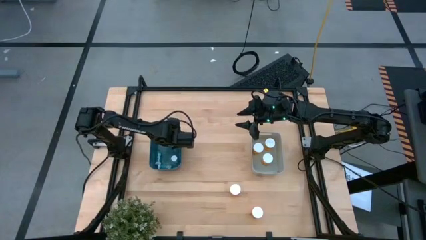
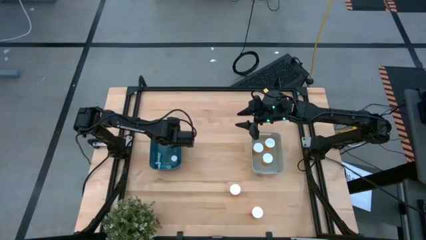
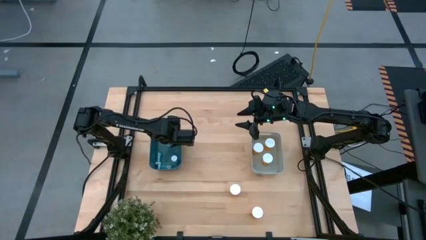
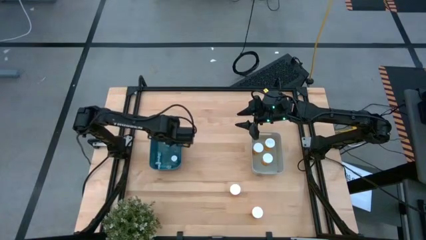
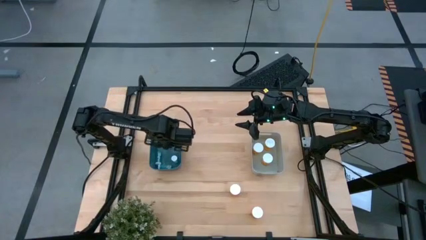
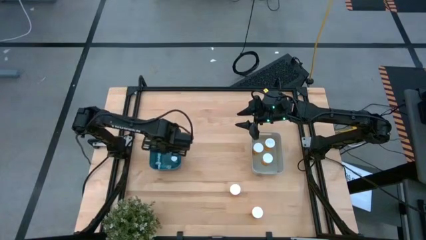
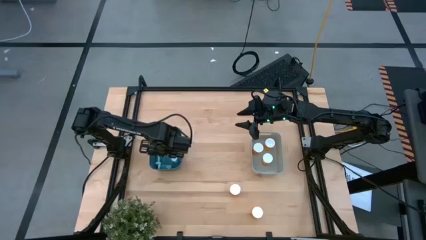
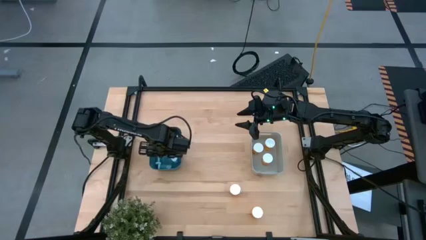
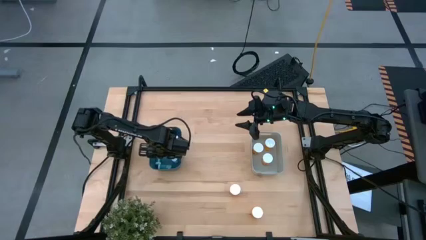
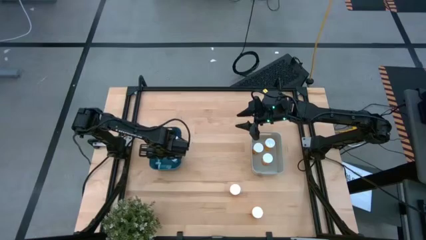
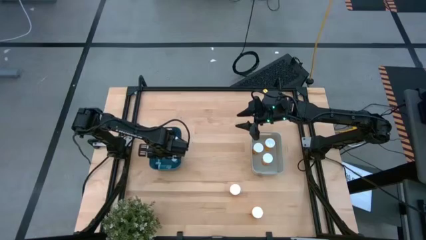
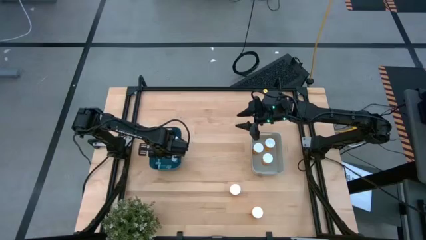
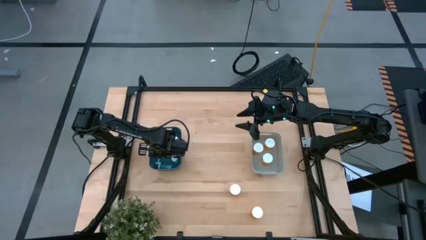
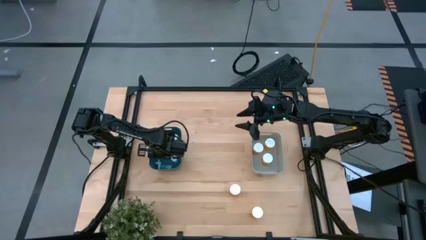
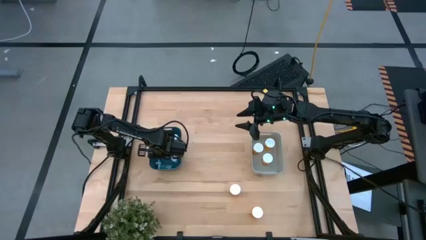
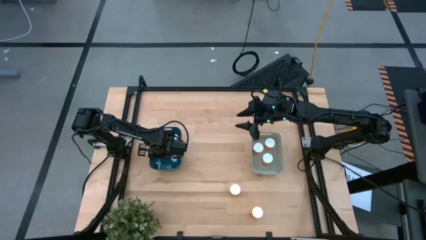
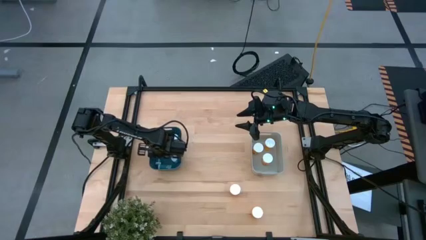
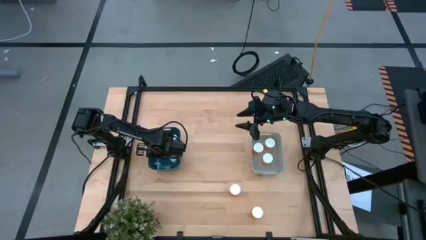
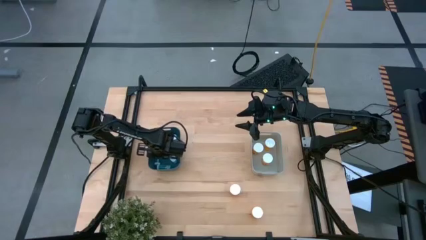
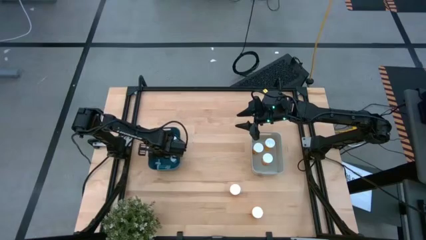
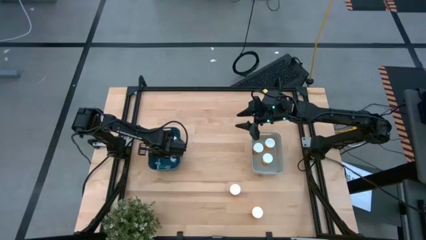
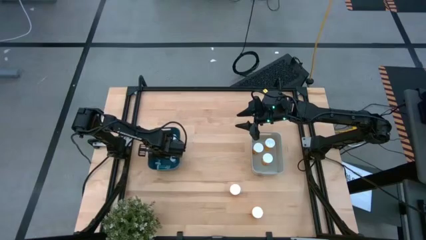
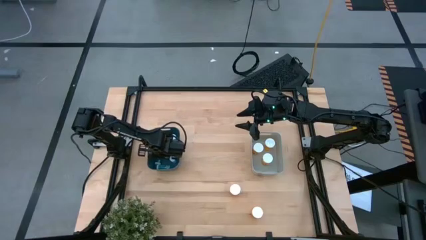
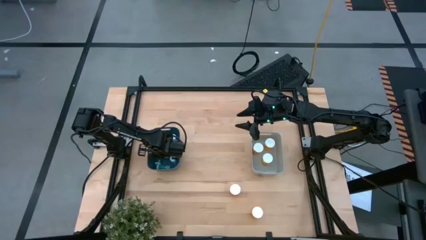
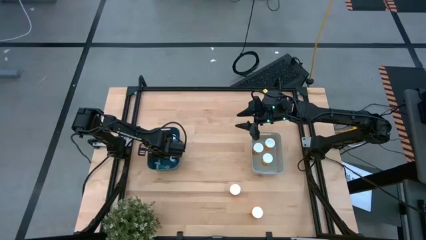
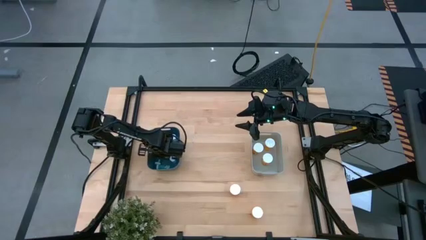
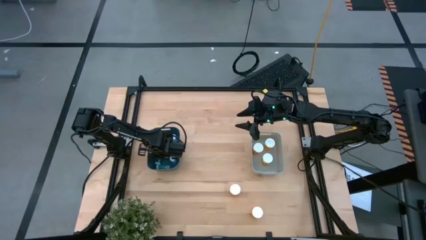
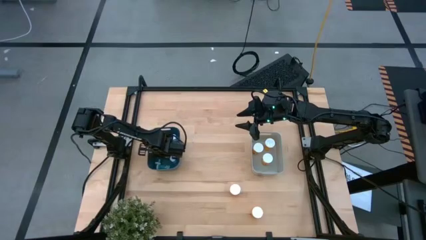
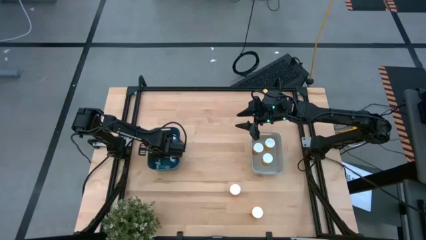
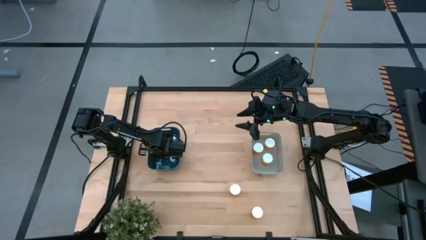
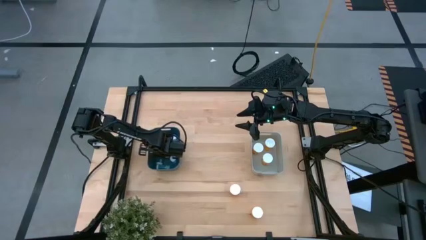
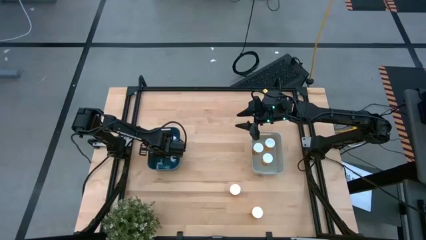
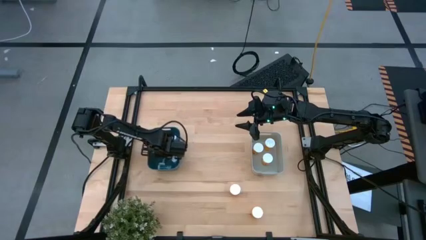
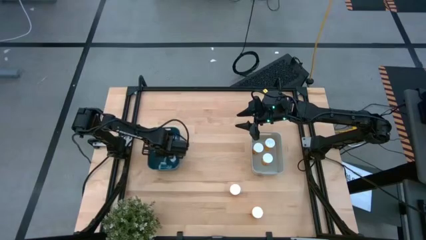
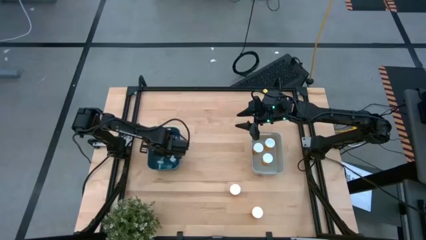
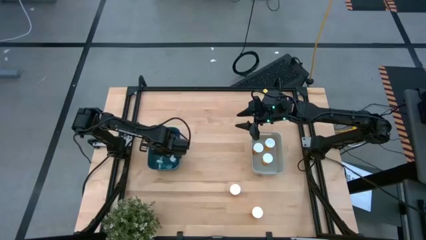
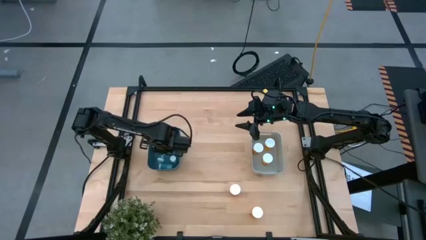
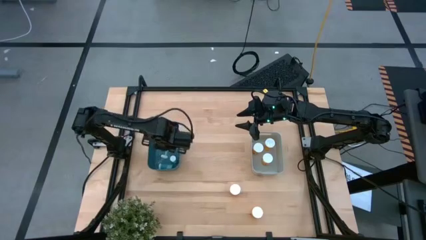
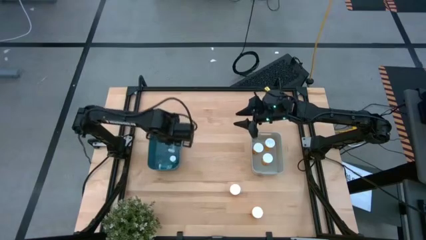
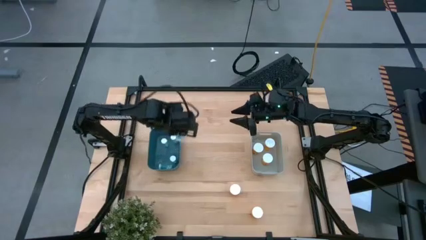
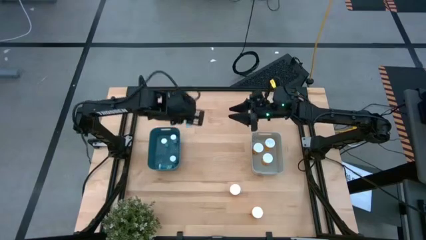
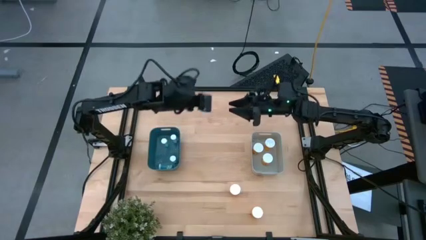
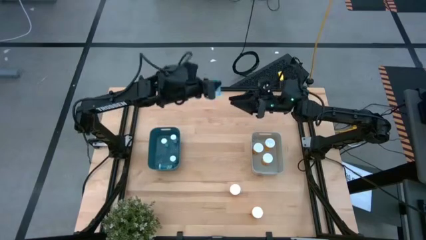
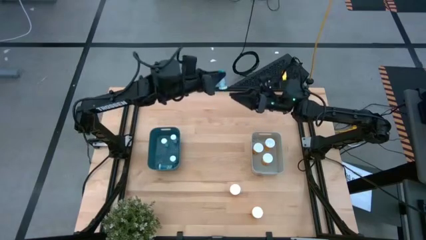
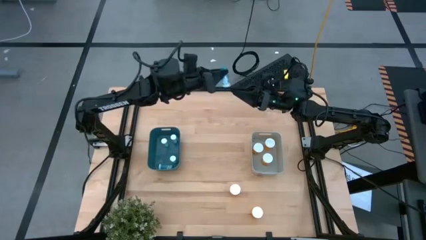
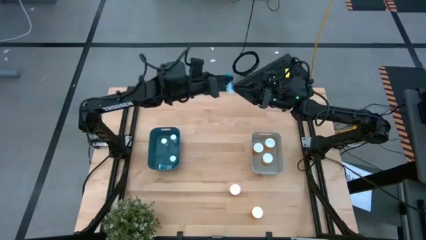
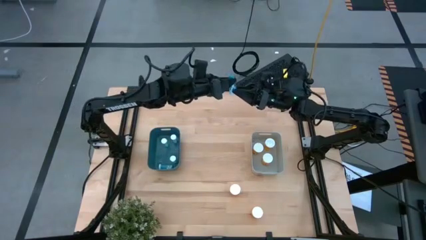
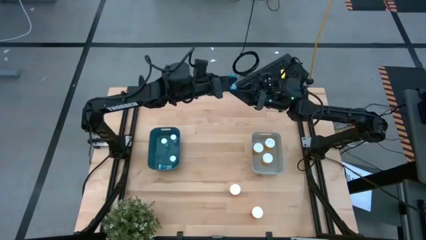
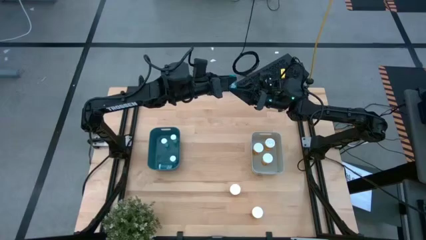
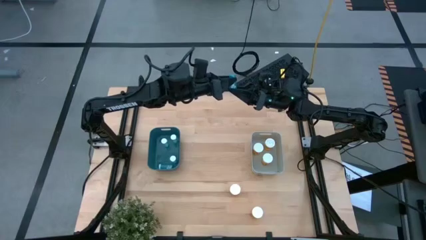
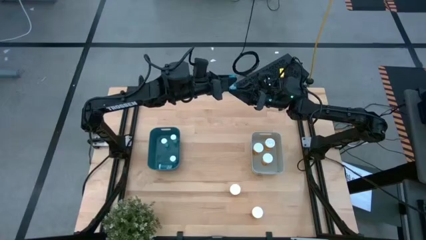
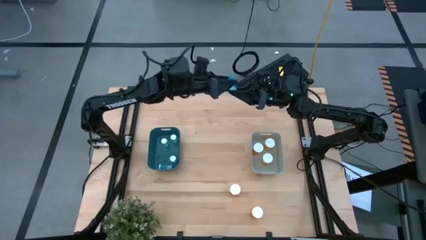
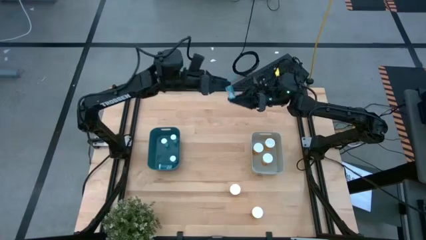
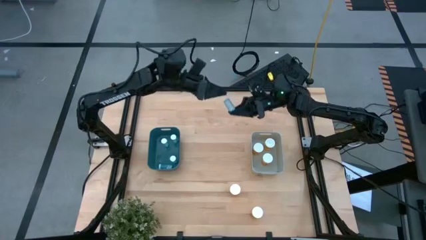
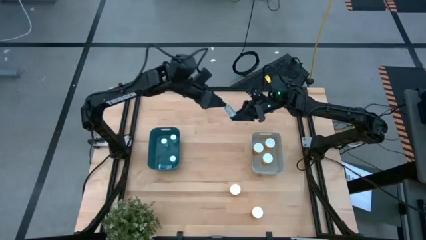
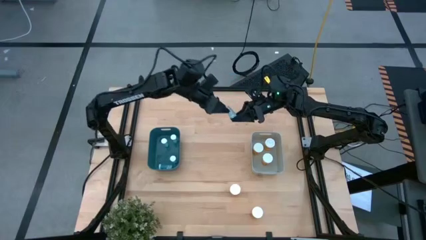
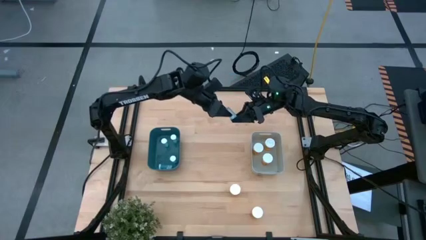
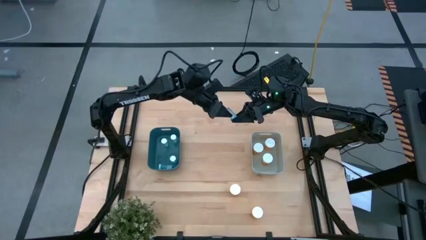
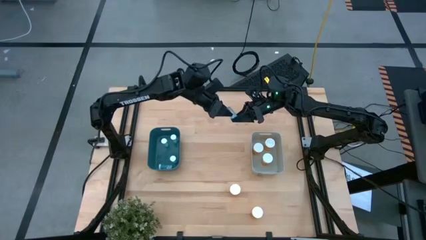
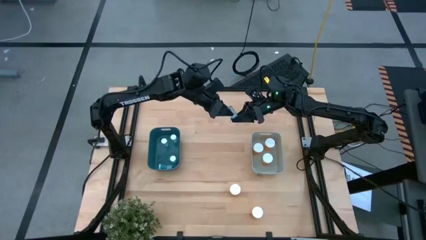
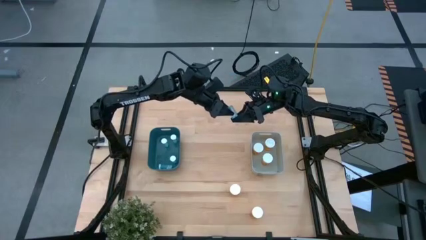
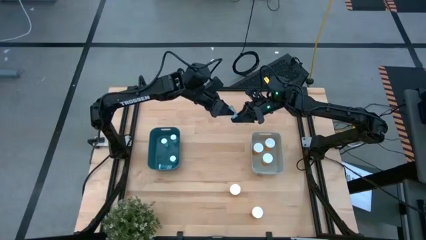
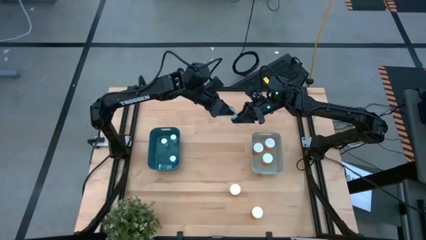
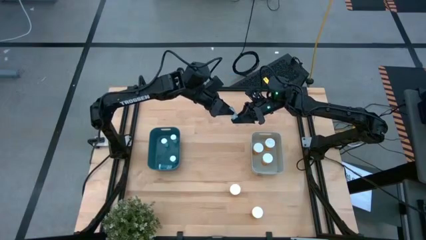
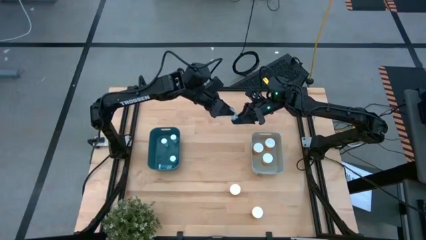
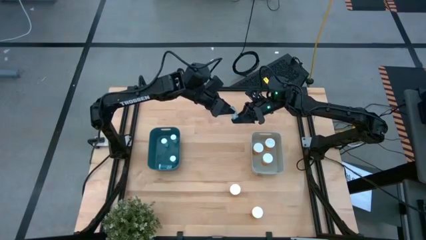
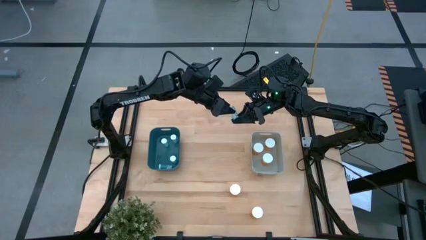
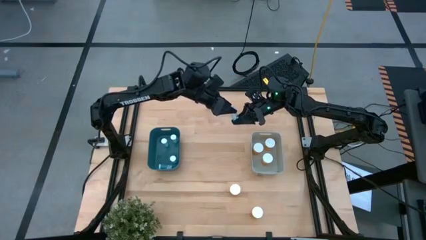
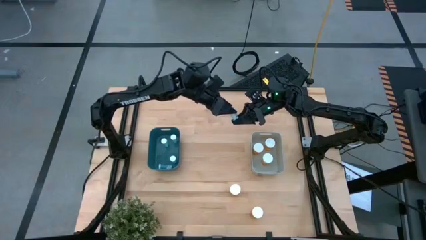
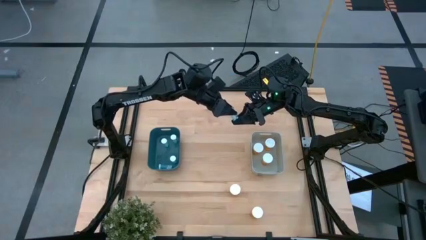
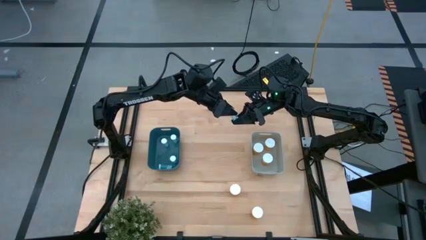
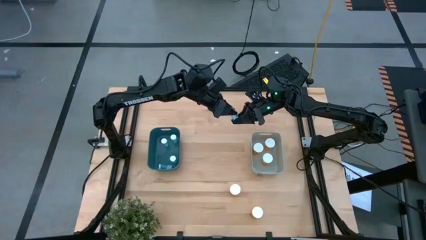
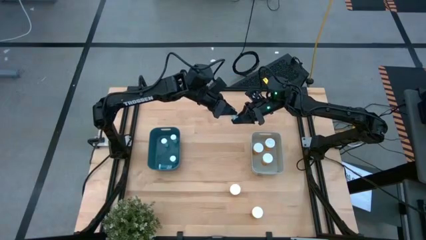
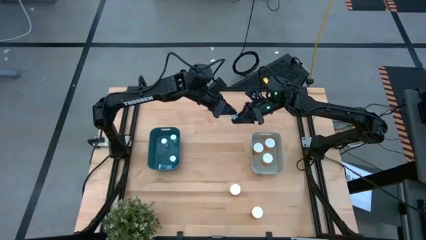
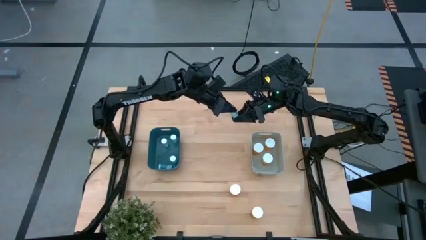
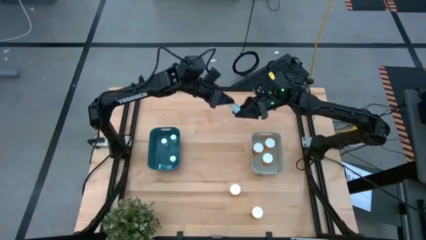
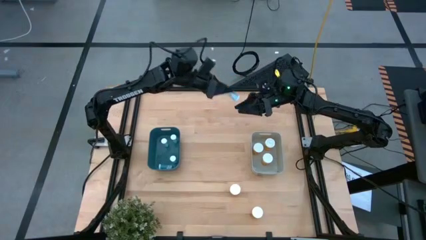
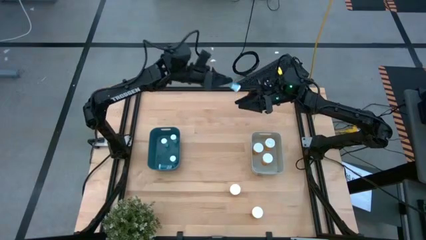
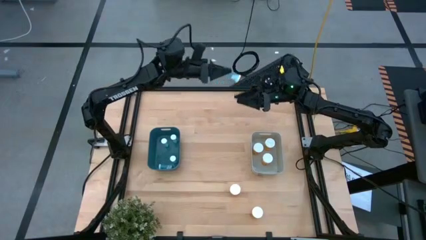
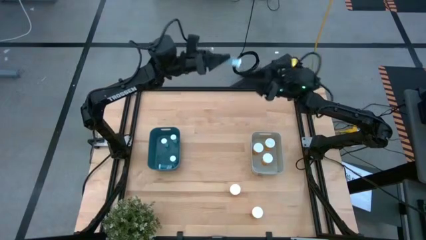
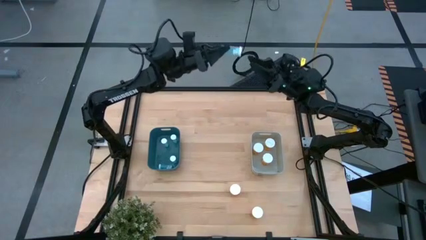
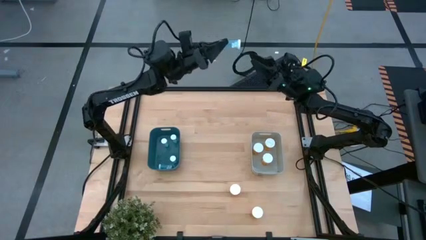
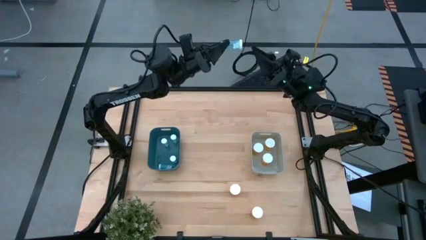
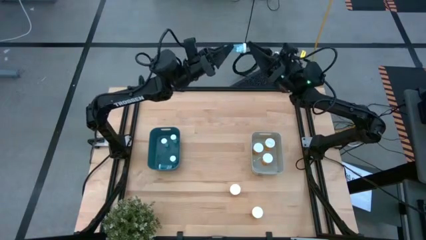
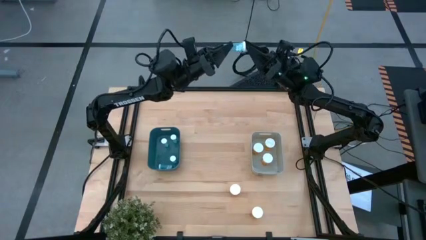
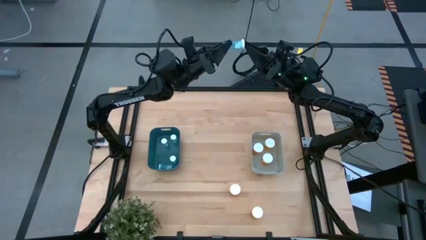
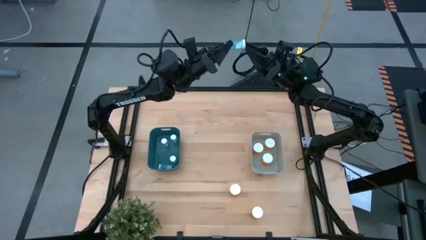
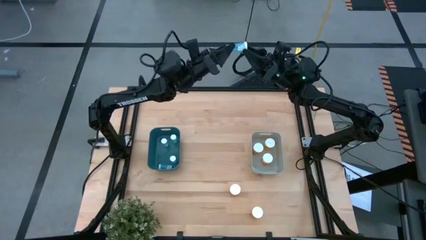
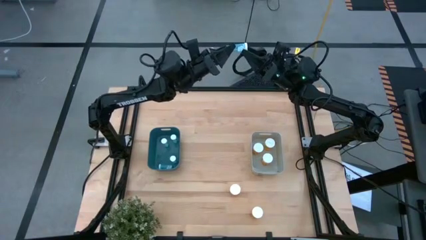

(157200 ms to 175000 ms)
Task: Pick and place medicine bottles into bin by pill shape (circle, oval)
Adjust the blue pill bottle
